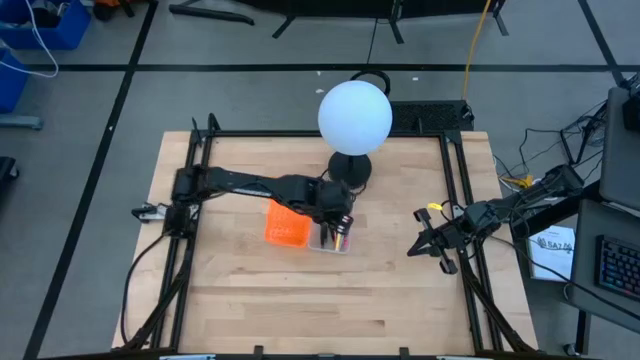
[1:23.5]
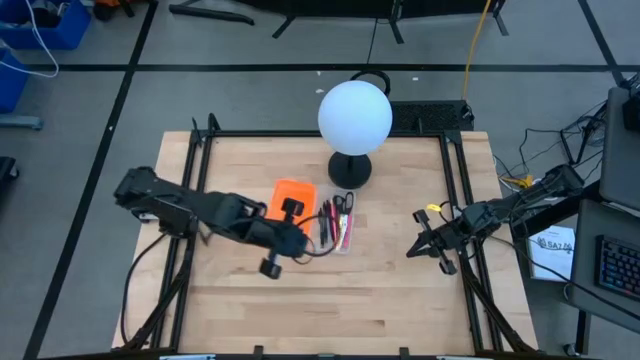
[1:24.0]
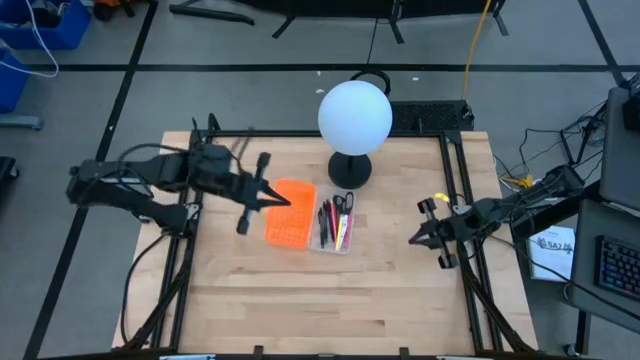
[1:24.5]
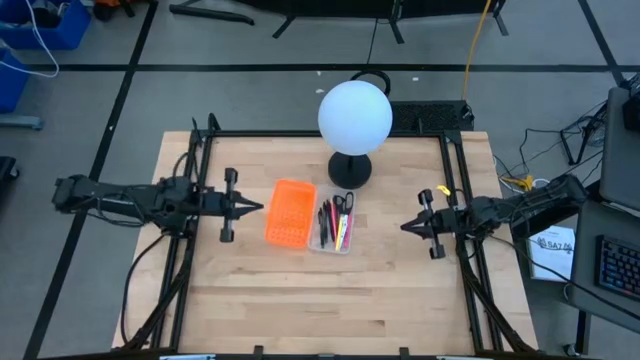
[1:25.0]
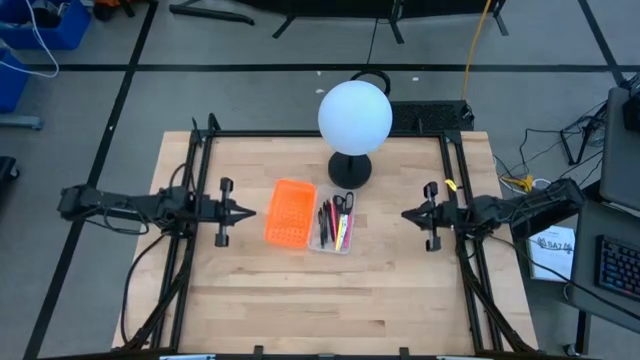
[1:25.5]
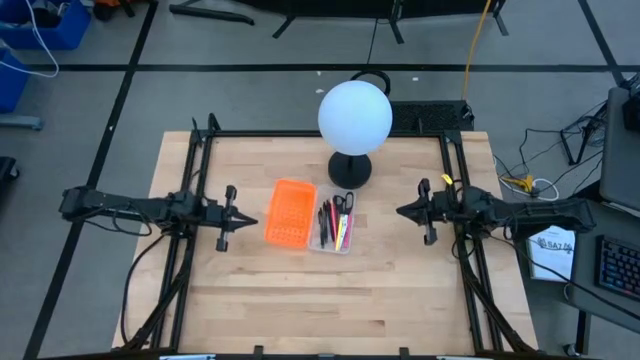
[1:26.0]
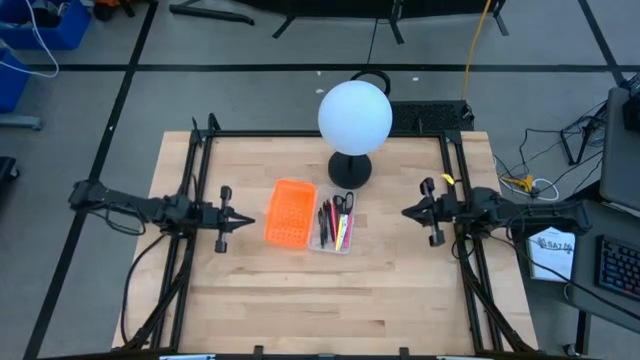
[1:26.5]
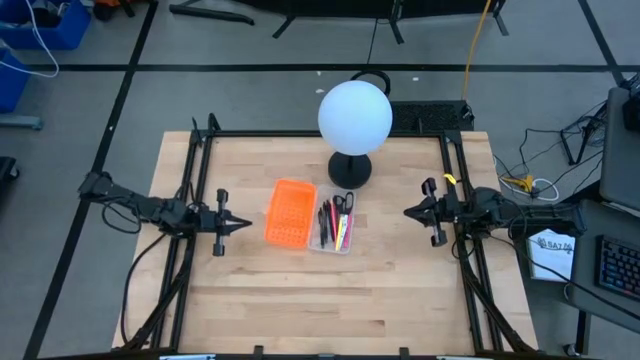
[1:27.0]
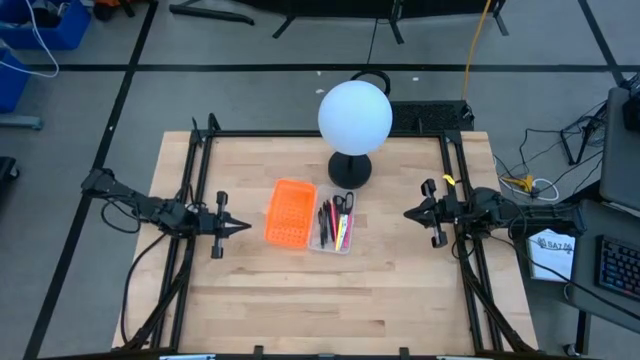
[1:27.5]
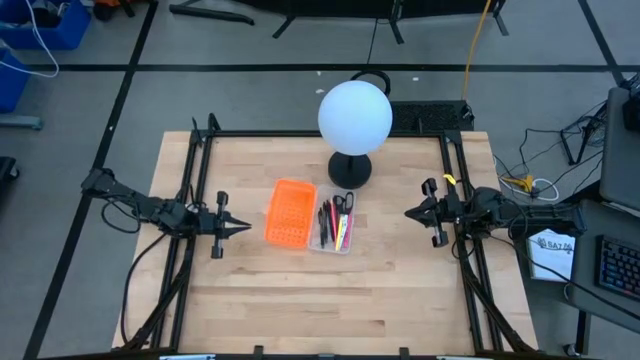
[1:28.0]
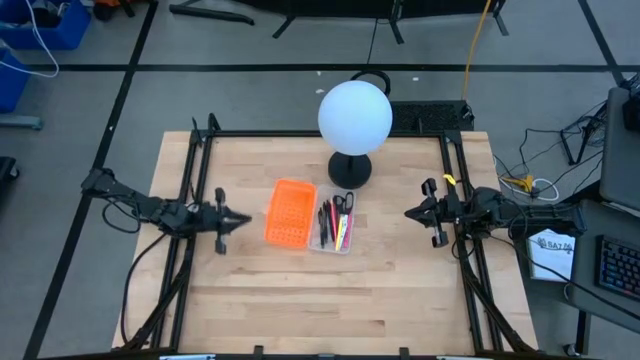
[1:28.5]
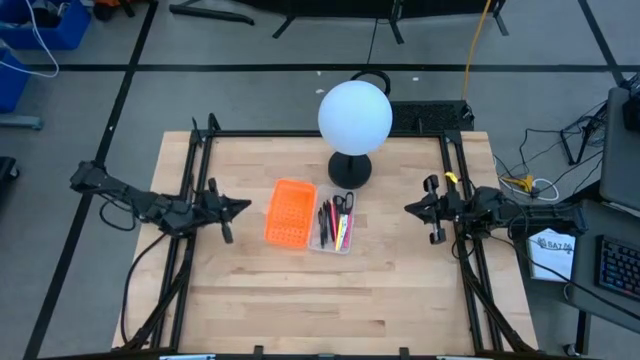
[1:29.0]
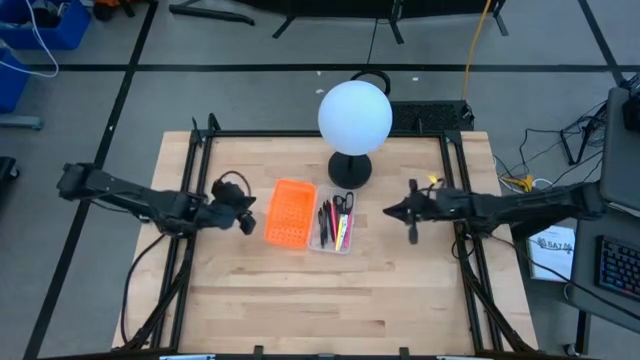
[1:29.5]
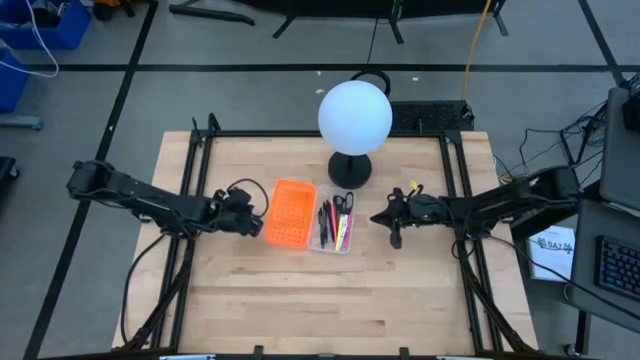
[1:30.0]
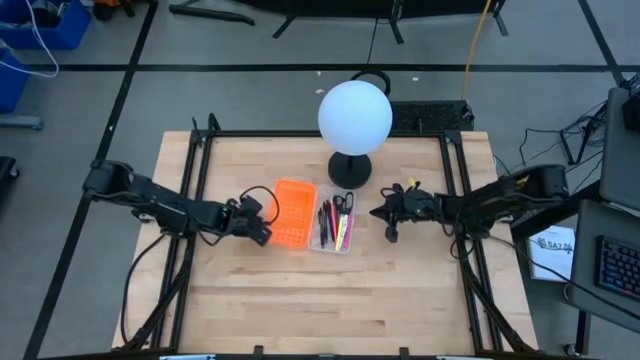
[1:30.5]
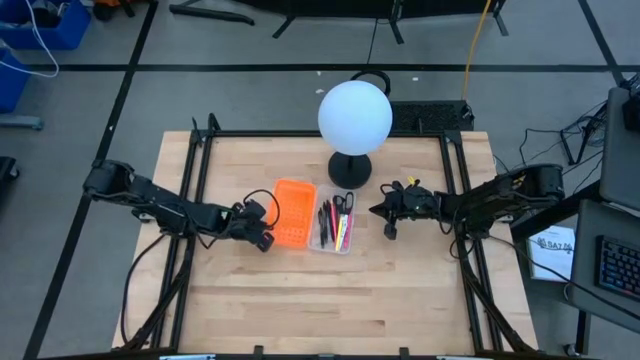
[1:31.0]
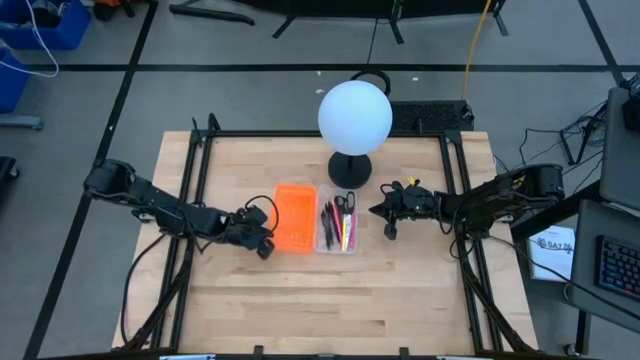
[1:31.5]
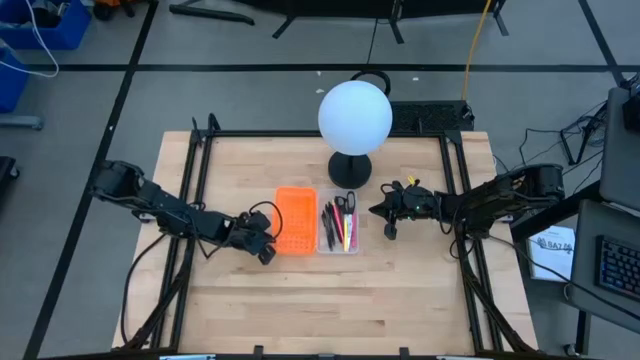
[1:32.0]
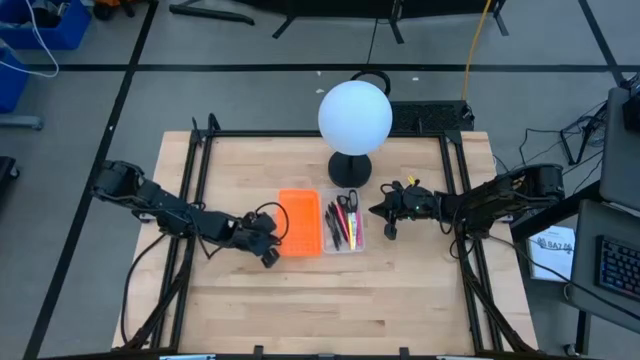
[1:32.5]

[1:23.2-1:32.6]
Task: Pick & place school supplies into a supply box
Adjust the supply box

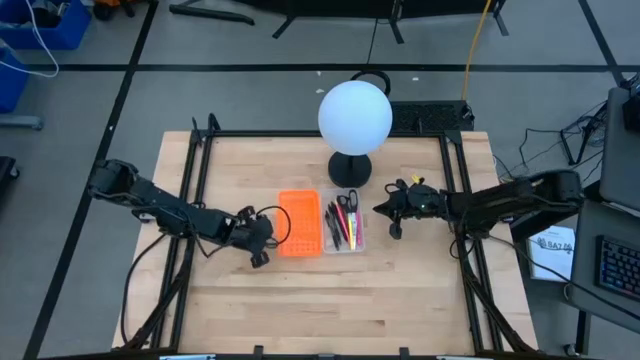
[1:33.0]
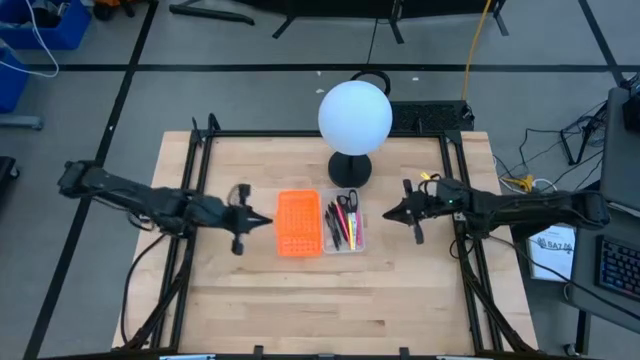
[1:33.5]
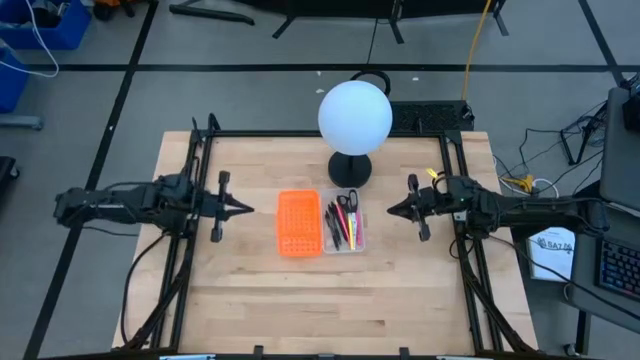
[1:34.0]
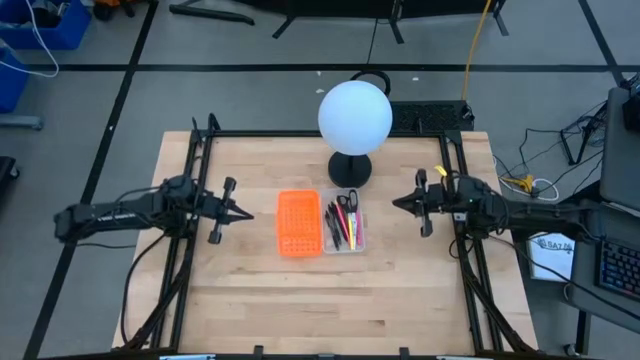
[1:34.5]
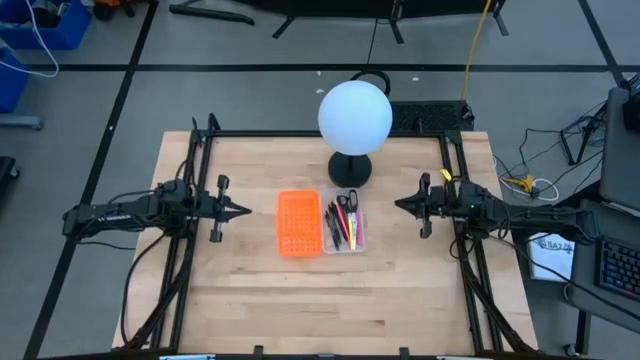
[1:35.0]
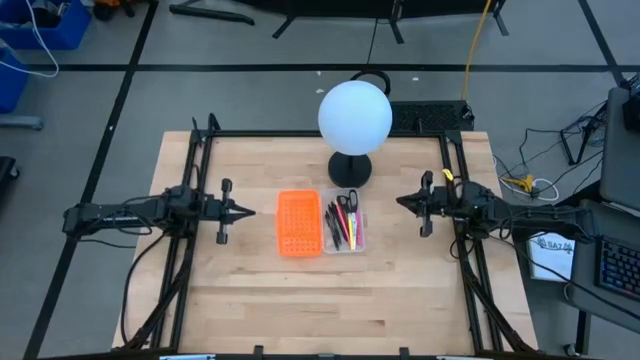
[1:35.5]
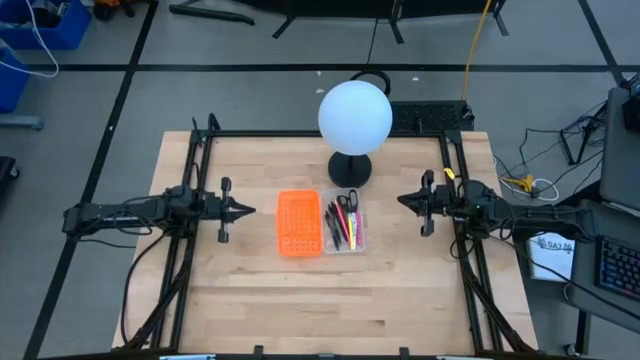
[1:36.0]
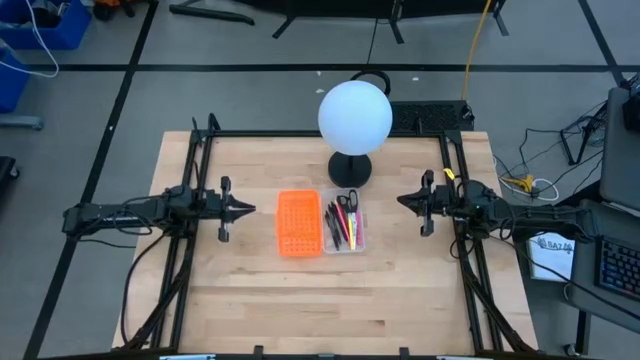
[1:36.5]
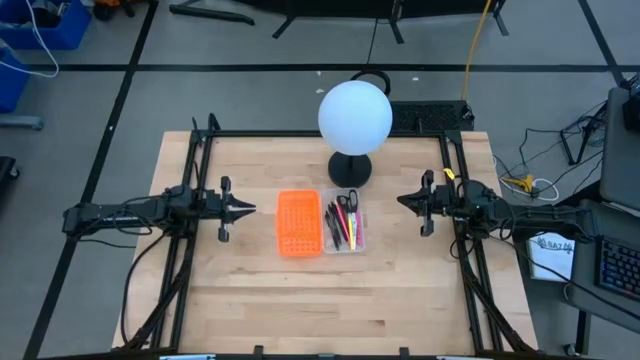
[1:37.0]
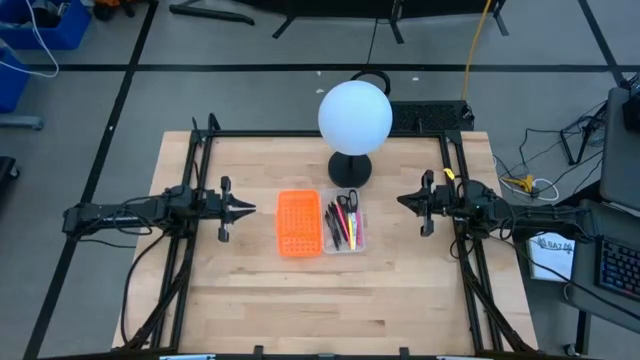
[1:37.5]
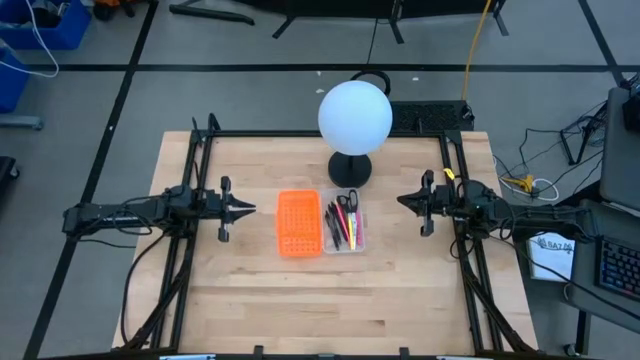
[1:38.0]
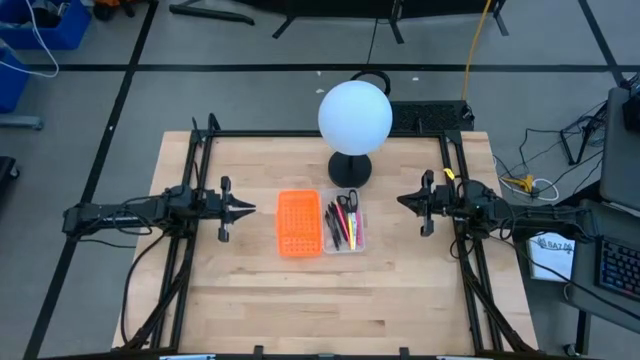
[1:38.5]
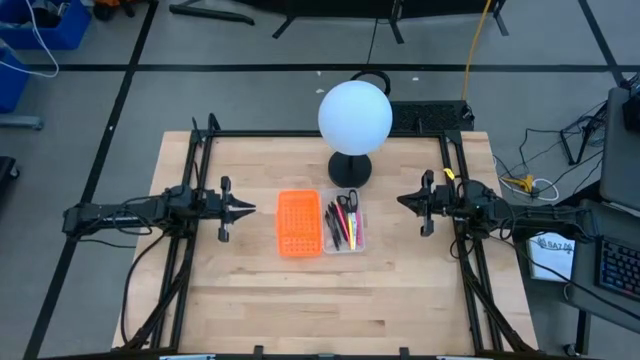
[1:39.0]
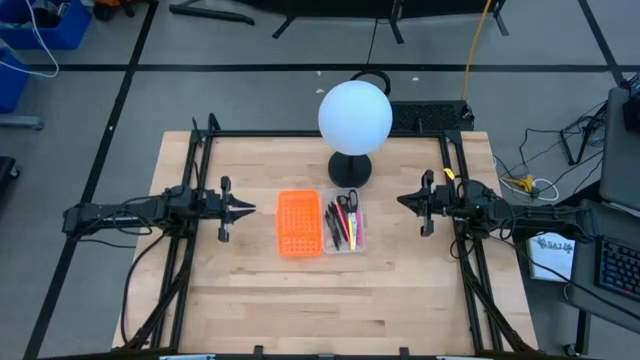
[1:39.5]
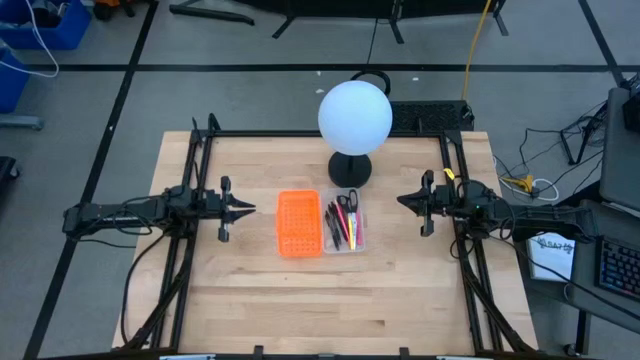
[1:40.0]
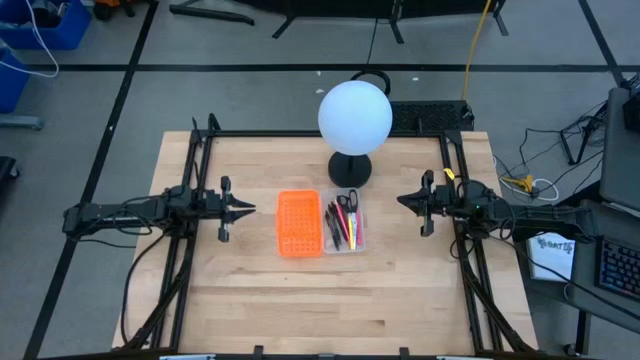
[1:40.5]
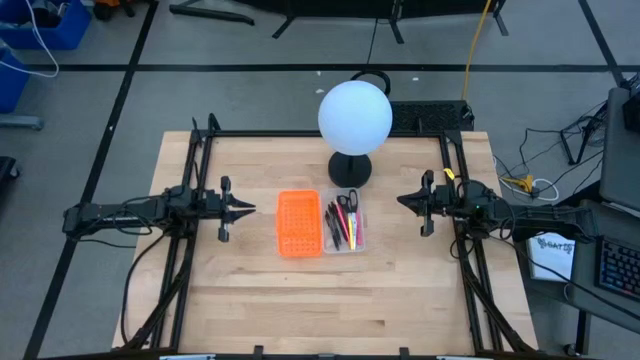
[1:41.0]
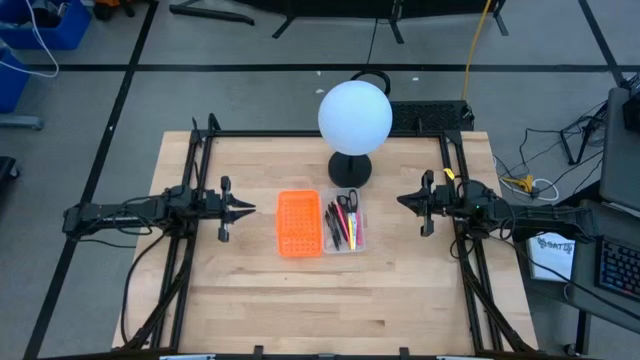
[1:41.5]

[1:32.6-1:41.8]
Return to Home Position

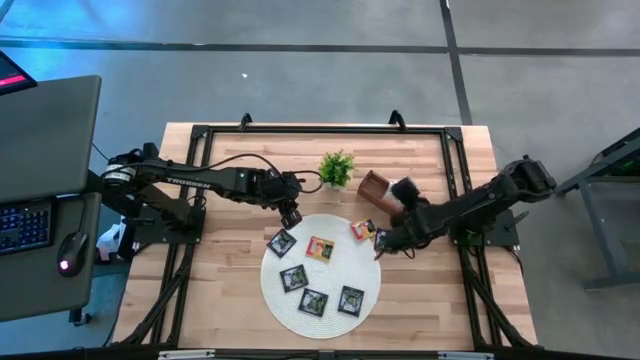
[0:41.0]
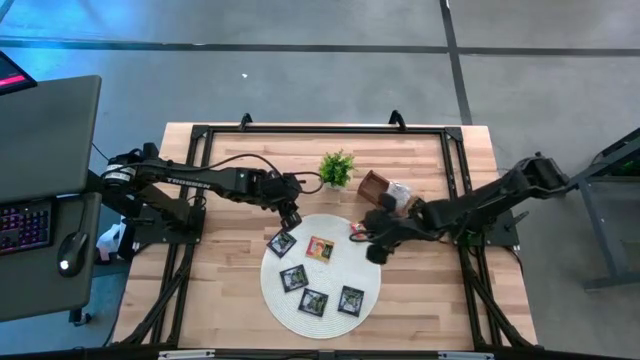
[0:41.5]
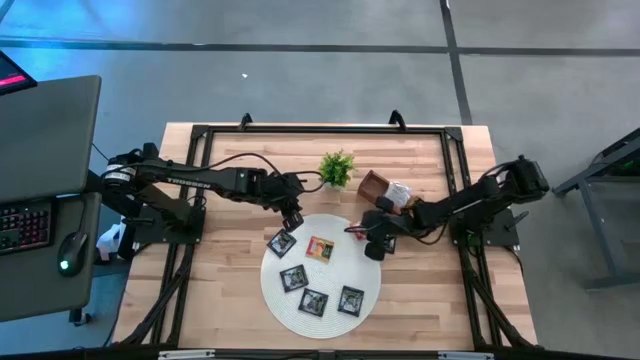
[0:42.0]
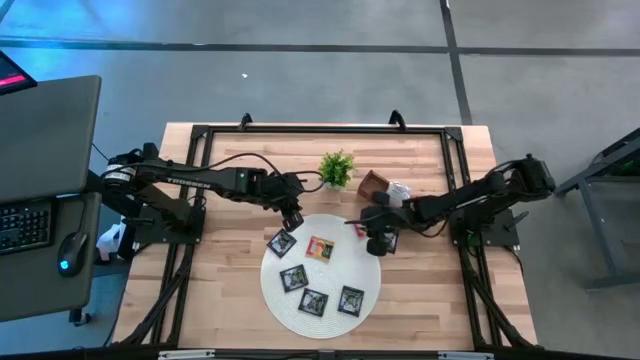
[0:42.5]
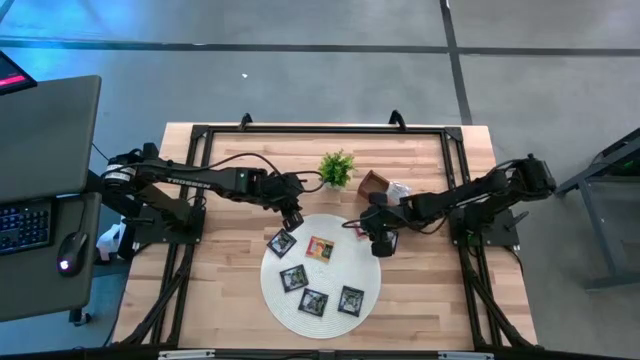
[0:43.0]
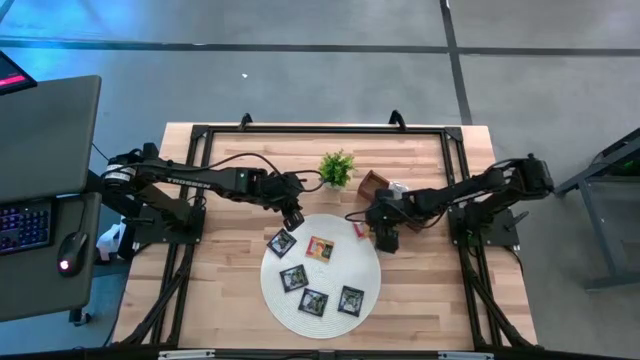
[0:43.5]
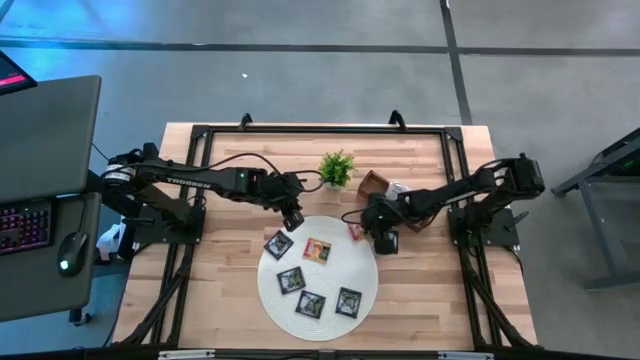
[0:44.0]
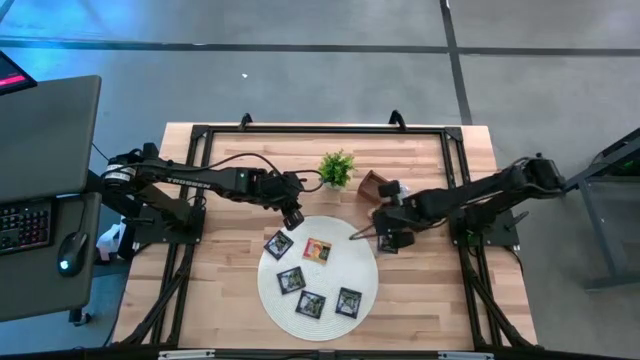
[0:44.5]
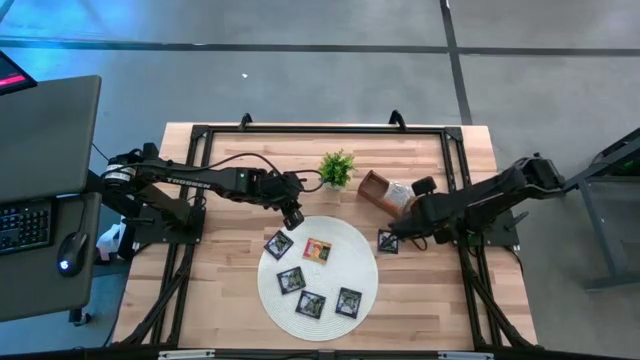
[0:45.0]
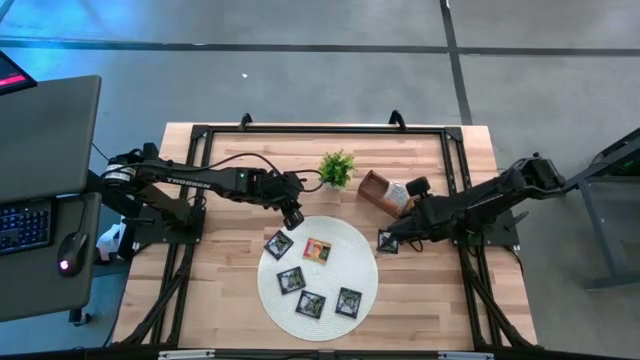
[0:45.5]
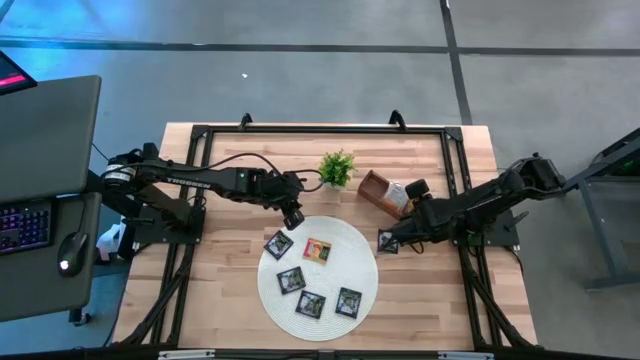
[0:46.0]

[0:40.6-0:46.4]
Task: Pick & Place Tea
Put the yellow tea bag into the right section of the wooden organizer
